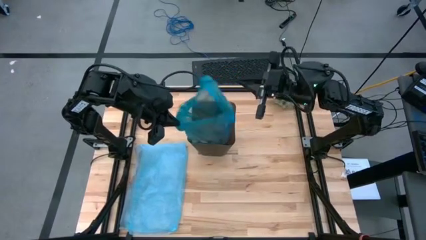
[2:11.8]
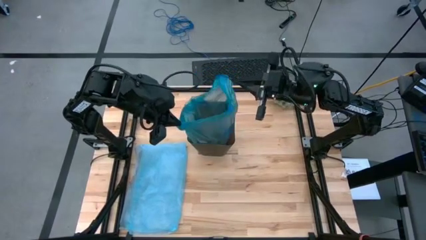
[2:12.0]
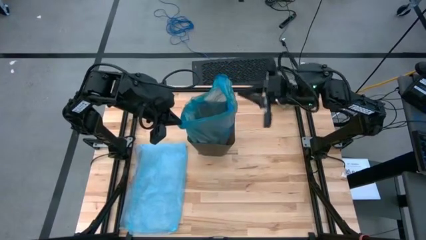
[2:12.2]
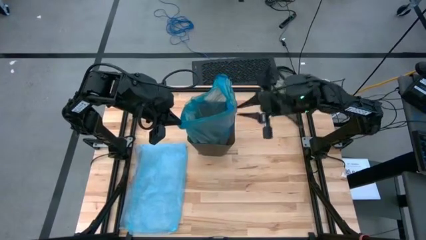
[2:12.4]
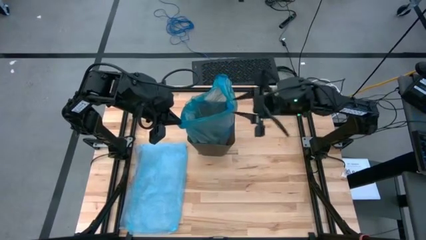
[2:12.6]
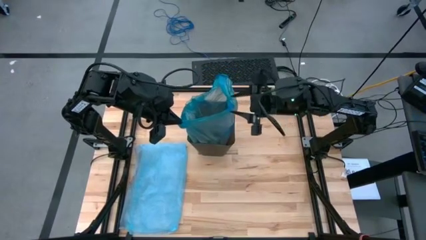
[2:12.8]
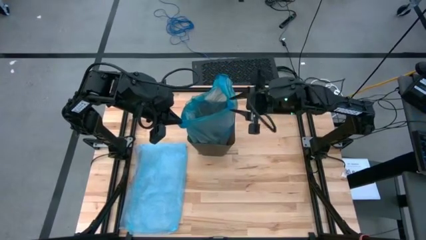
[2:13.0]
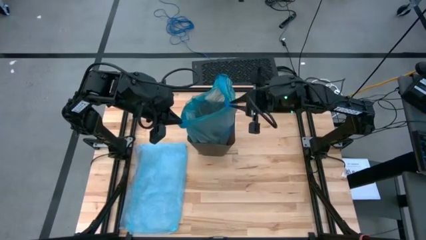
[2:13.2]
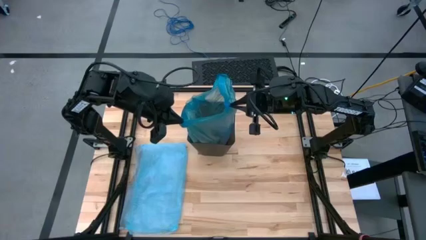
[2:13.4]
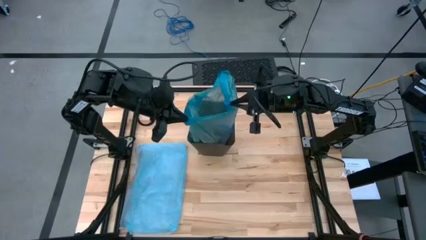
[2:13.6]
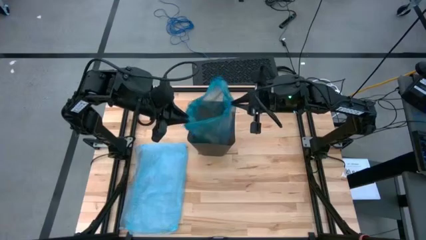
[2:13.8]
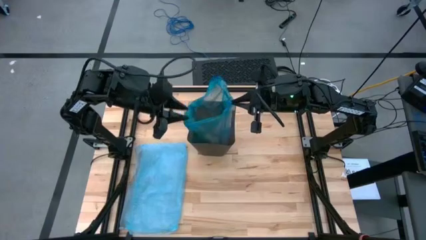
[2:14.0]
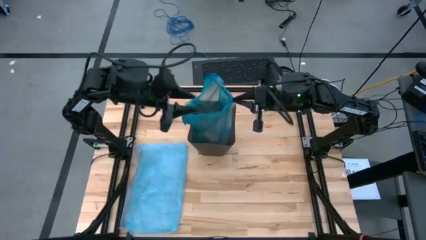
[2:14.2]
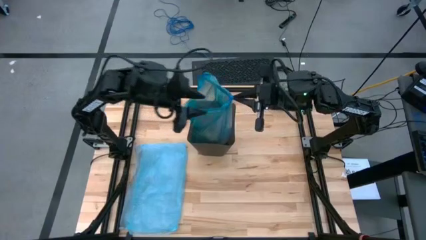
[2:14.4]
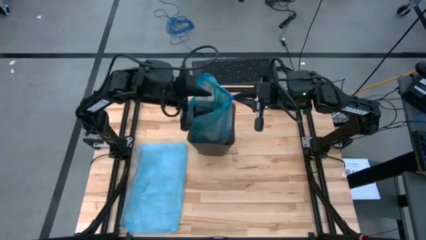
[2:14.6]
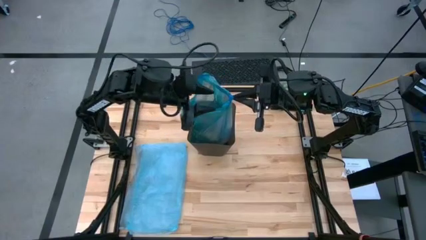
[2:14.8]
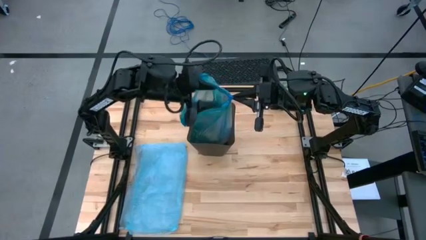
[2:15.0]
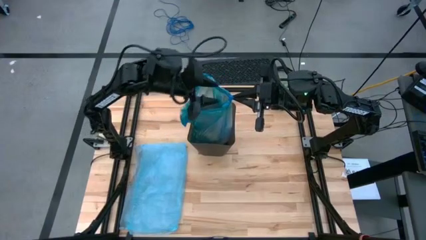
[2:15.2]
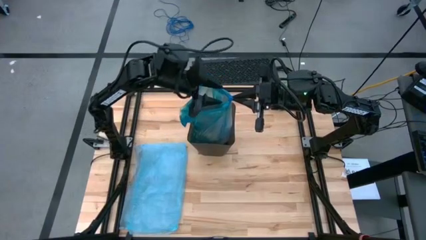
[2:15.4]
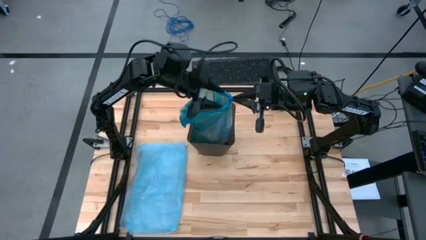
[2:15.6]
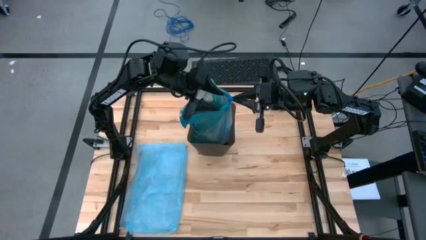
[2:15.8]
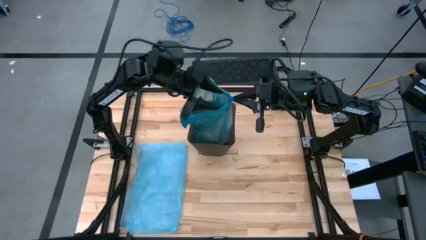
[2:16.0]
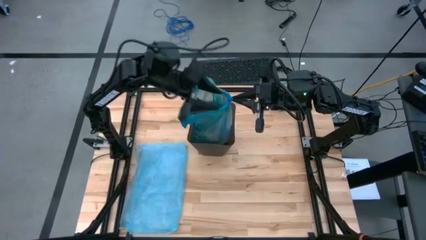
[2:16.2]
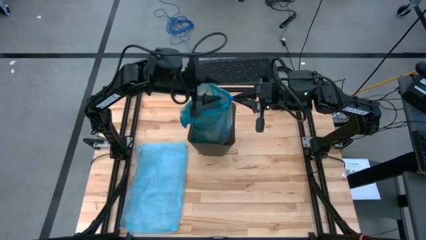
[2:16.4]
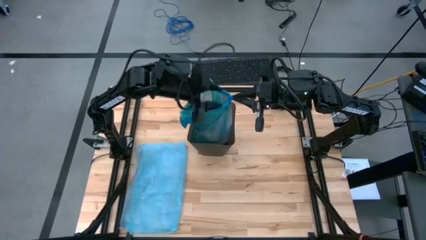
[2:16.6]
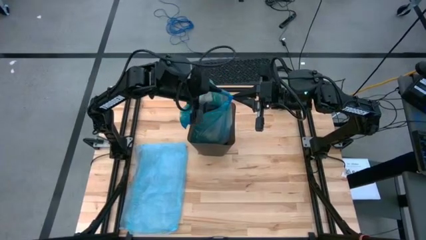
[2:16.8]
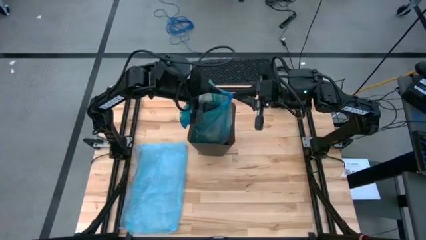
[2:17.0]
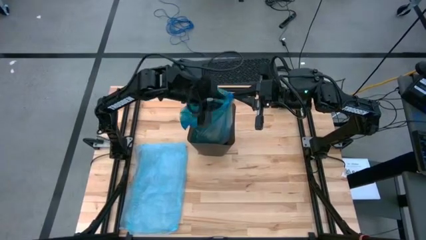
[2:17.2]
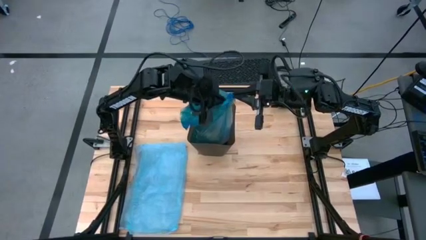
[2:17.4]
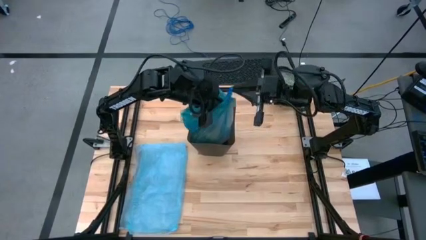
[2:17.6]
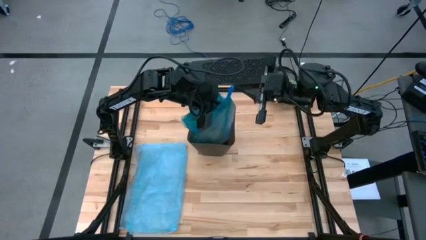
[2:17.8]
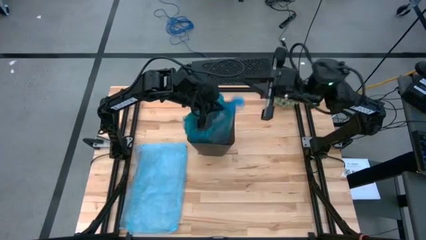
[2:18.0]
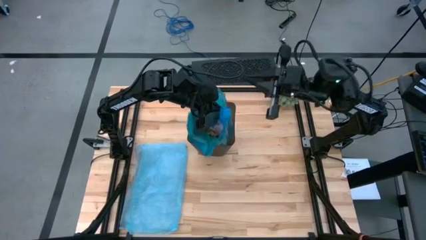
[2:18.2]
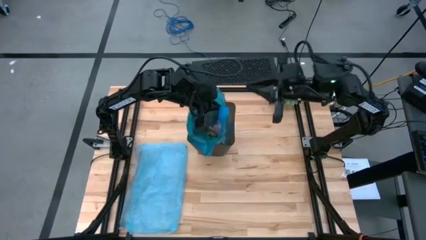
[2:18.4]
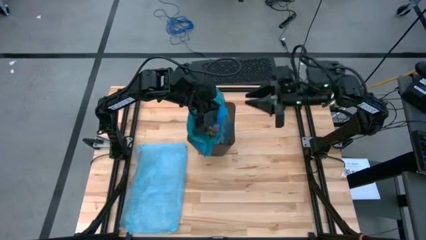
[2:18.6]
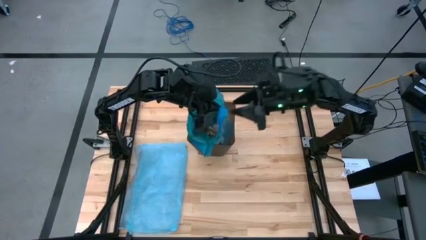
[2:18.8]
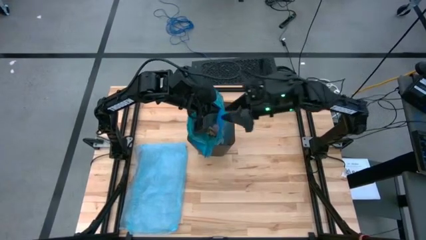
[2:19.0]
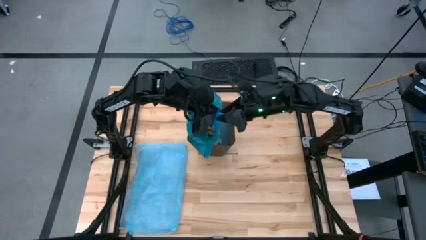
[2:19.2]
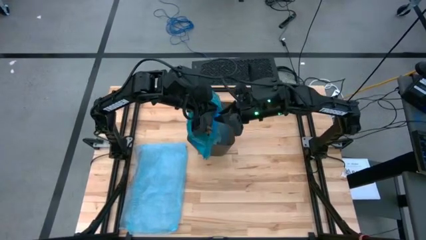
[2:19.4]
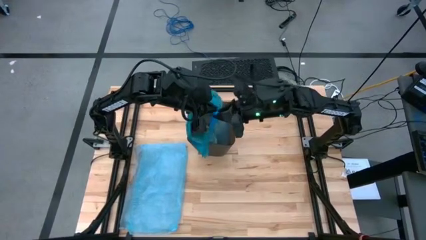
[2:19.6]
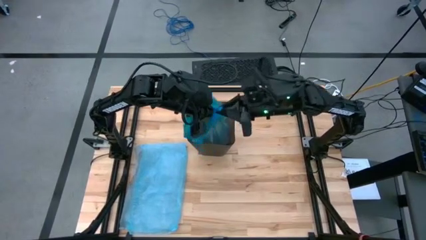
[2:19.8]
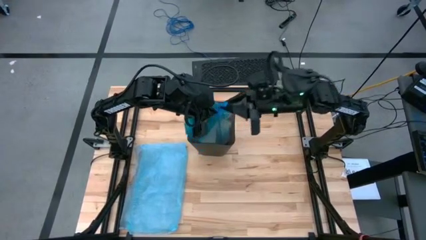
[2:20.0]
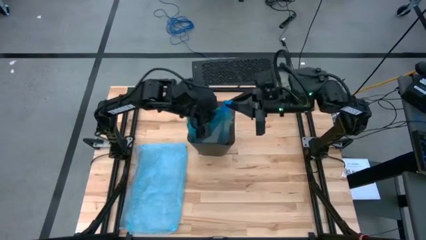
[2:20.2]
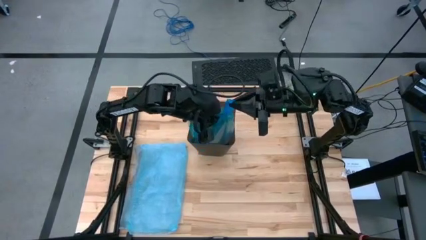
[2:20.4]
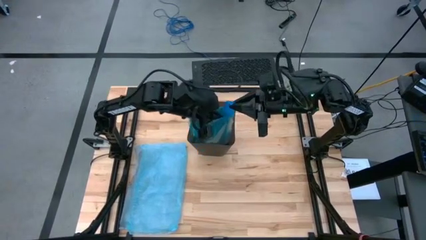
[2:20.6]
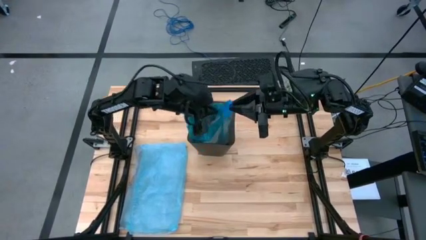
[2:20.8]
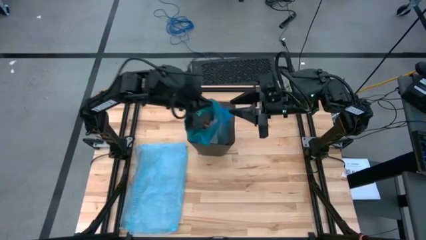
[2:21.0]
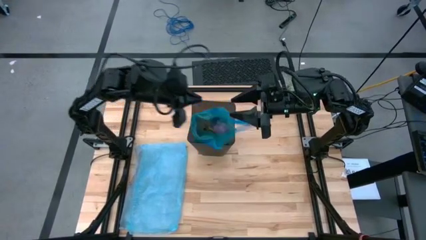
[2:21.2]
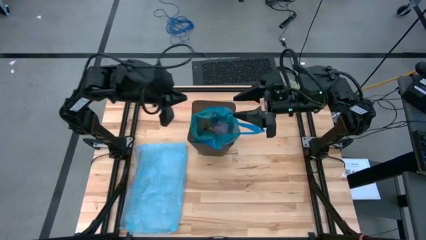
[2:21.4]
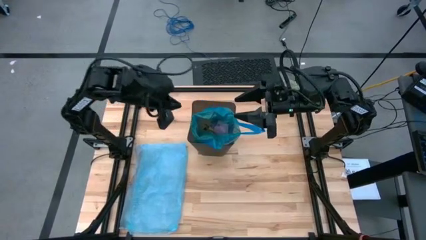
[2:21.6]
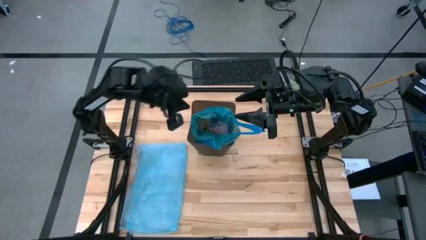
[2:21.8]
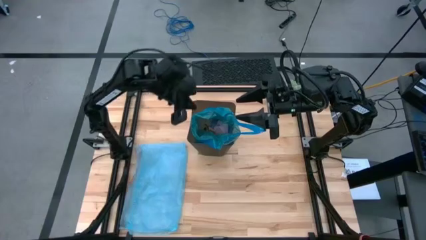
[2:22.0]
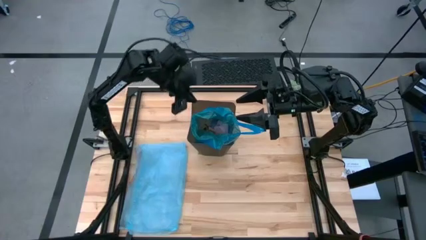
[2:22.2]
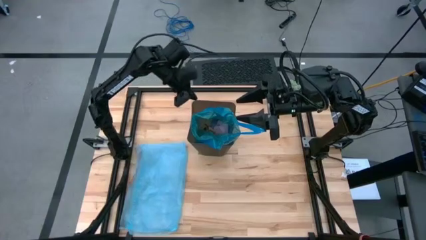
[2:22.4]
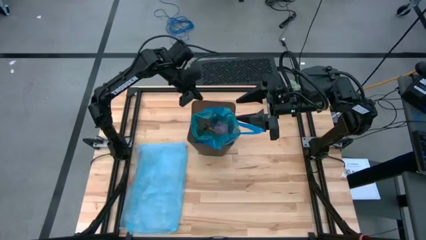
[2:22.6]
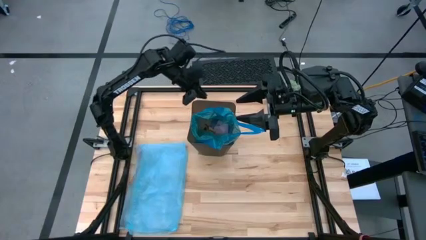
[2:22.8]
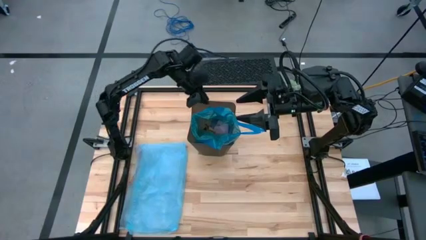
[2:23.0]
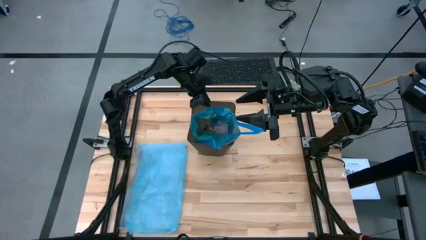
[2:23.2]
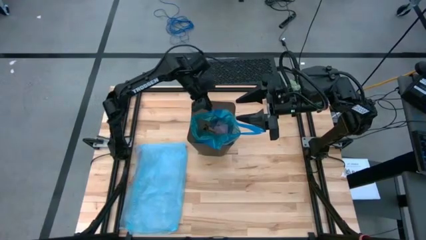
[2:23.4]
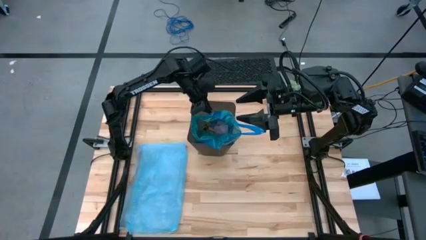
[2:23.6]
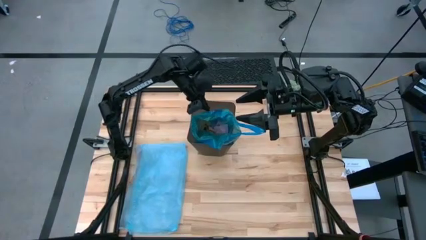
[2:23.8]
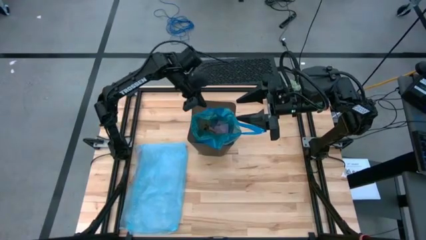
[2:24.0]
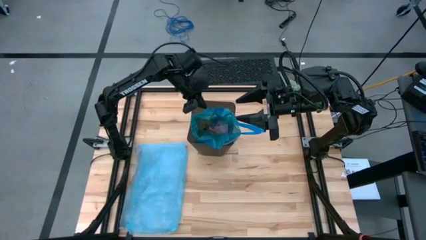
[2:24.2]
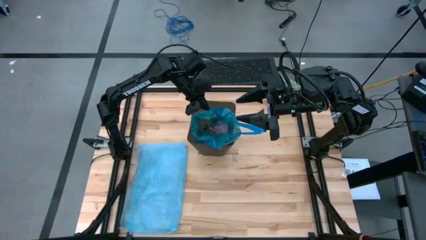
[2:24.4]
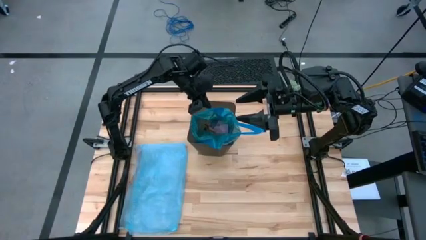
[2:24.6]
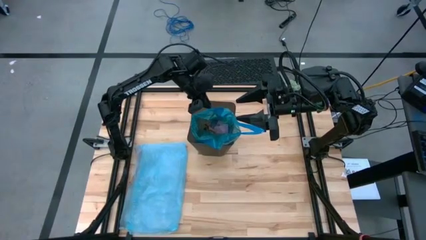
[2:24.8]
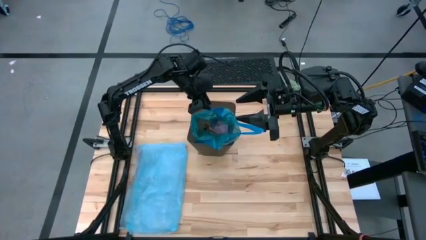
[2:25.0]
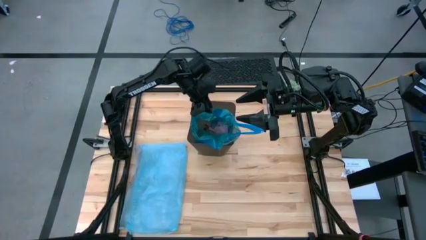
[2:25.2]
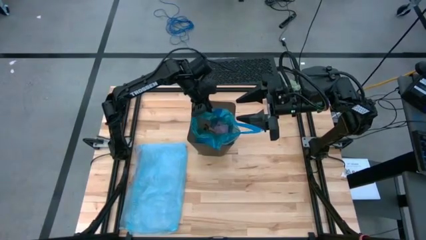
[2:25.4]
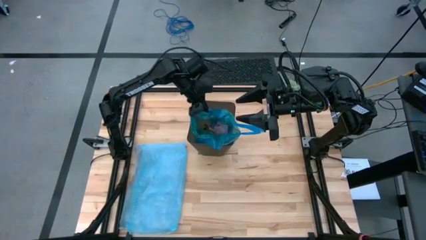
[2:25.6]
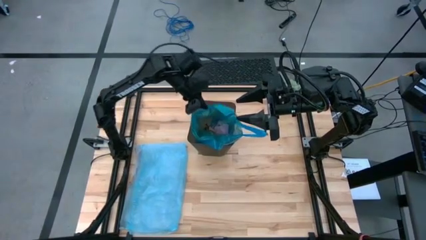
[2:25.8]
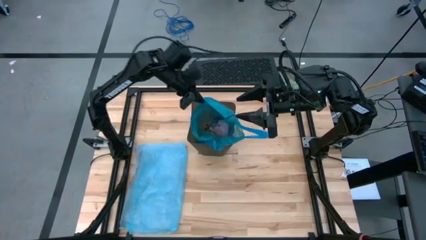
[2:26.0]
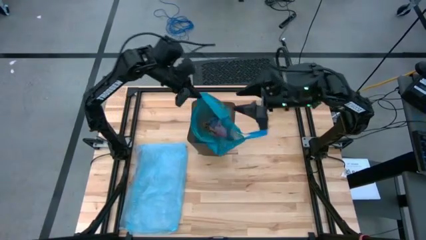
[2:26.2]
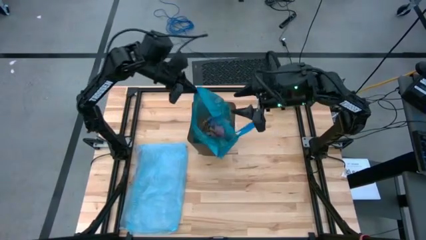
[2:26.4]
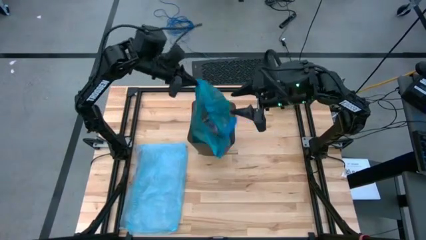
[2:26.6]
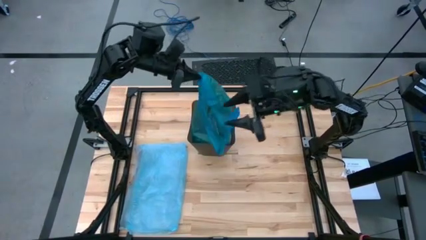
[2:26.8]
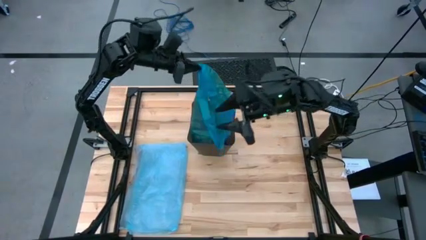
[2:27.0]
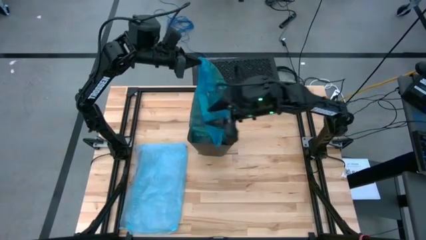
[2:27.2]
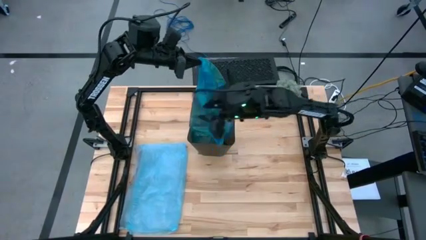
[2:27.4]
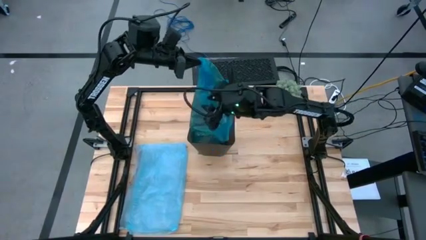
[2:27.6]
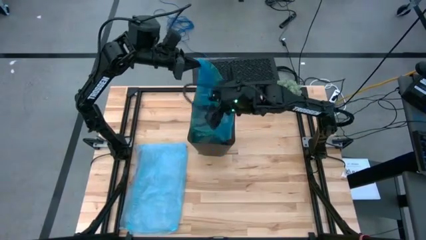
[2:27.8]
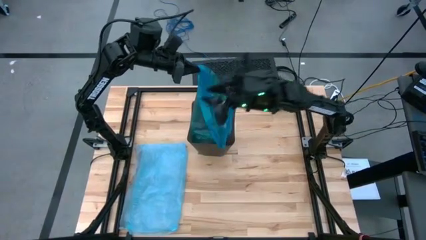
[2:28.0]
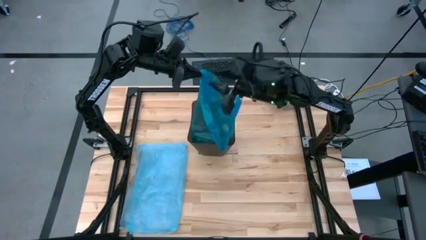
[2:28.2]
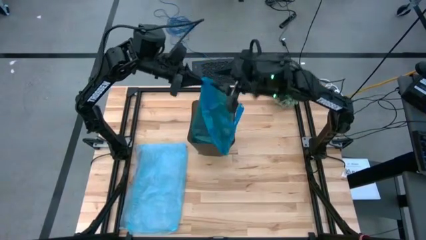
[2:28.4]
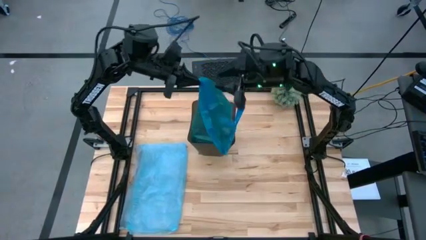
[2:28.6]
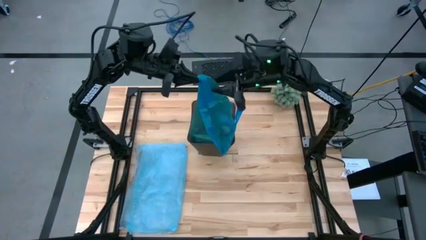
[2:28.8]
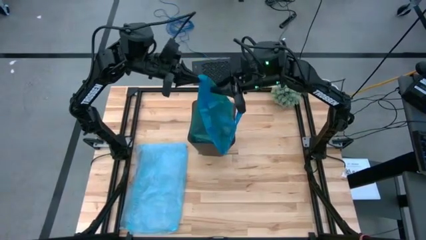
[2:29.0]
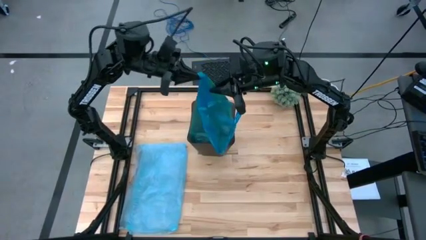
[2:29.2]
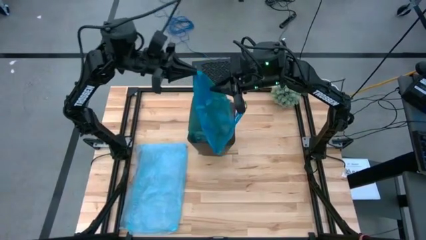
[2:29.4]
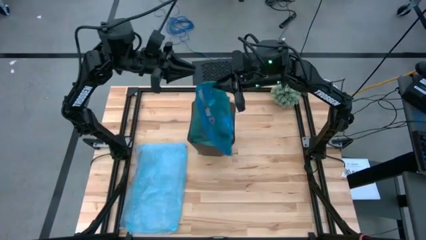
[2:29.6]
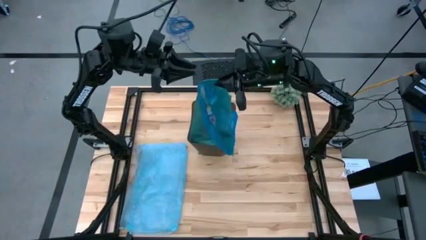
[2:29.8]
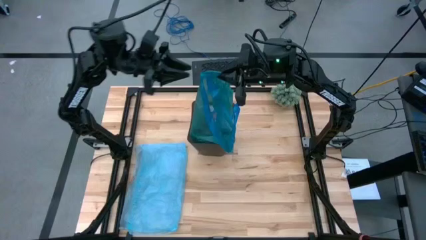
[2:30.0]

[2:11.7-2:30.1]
Task: place trash/remove bag and relplace
Remove the trash bag from the trash bin
